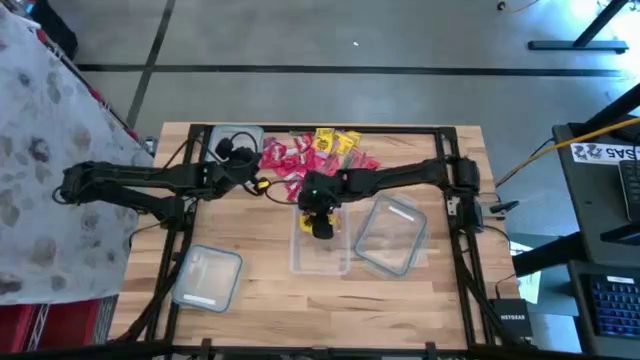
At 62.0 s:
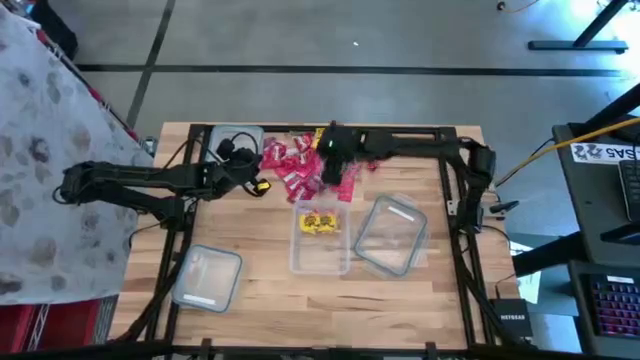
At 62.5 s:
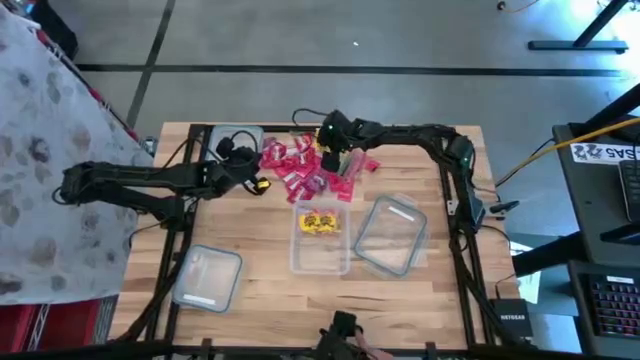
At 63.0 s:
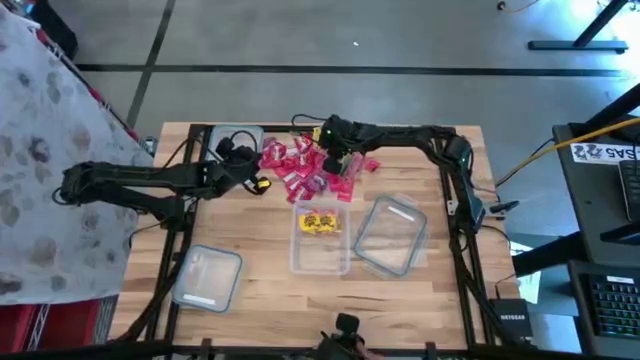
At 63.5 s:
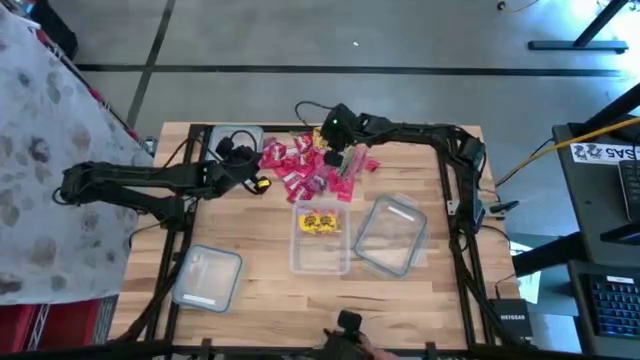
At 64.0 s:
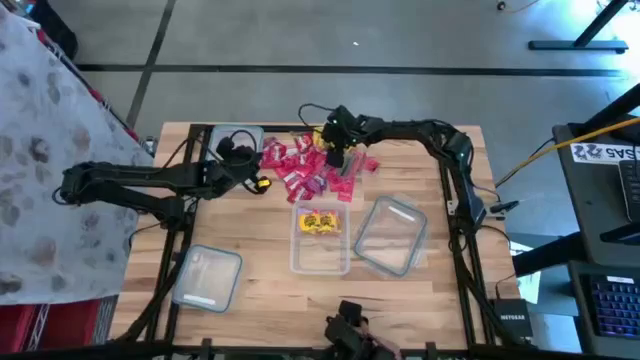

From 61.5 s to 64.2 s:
Task: Sort candy
Put the yellow candy into the right transparent bin

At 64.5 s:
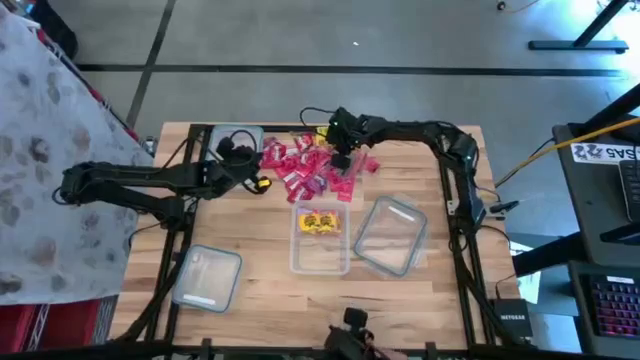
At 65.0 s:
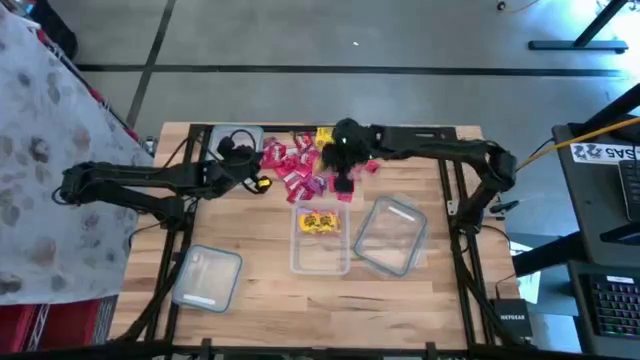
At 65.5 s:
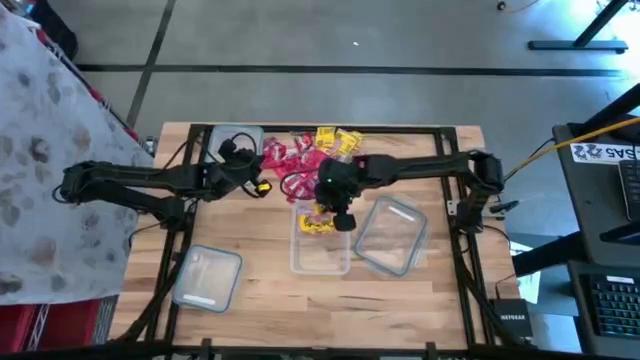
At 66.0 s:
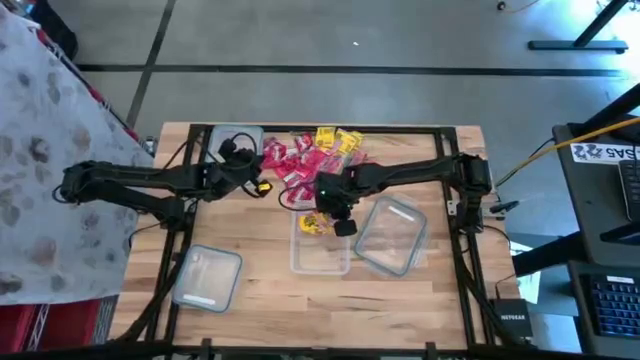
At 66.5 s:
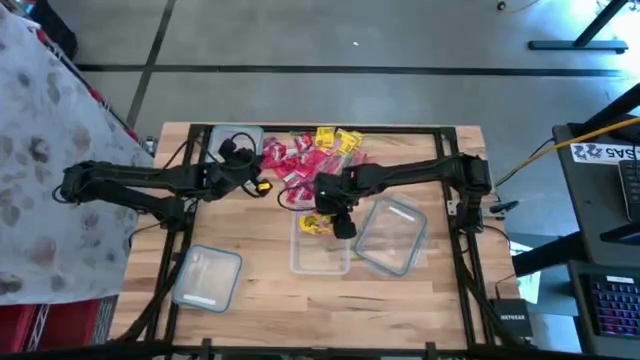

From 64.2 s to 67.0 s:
Put the yellow candy into the right transparent bin

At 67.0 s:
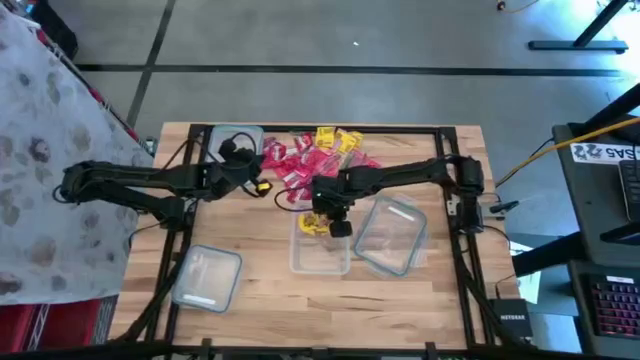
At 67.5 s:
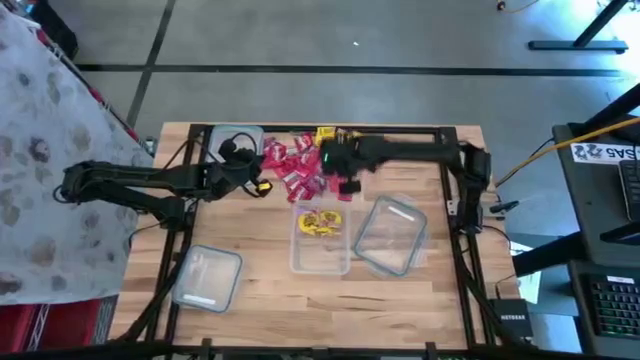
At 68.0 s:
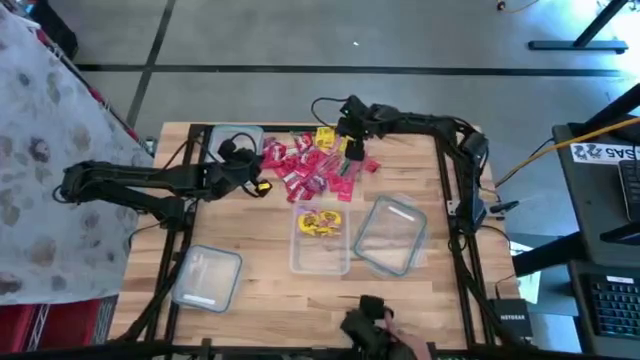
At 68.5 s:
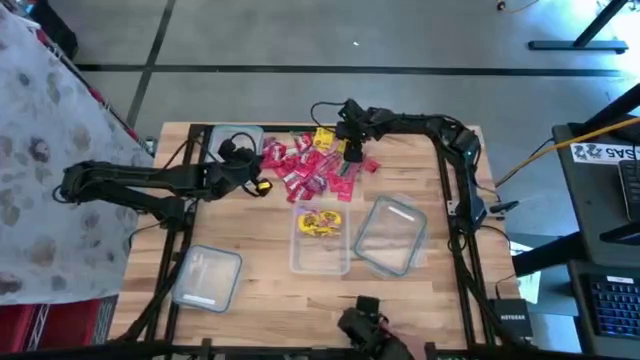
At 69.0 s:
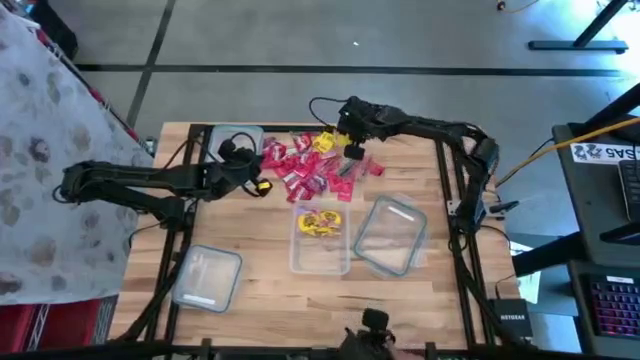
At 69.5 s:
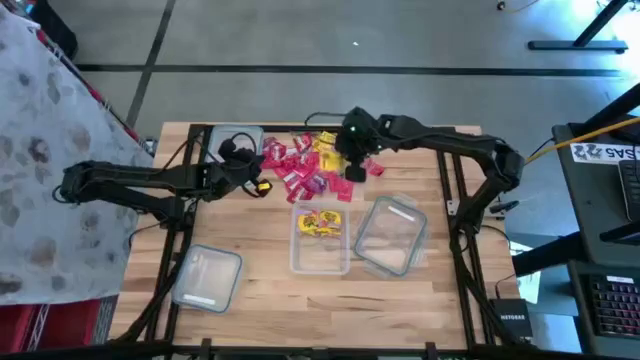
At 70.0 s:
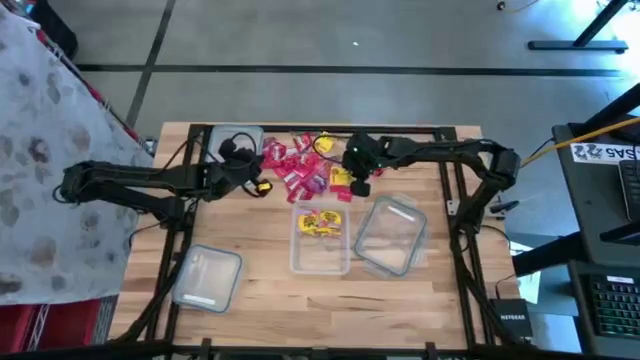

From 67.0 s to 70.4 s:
Put the yellow candy into the right transparent bin

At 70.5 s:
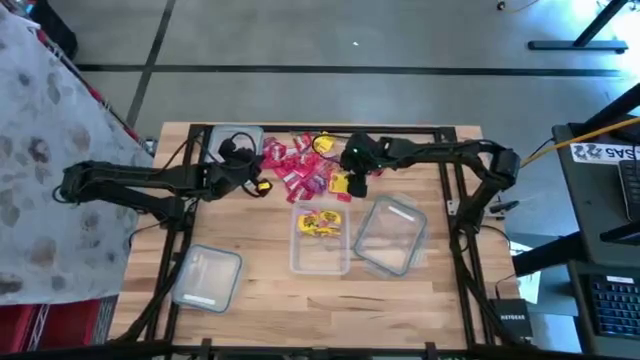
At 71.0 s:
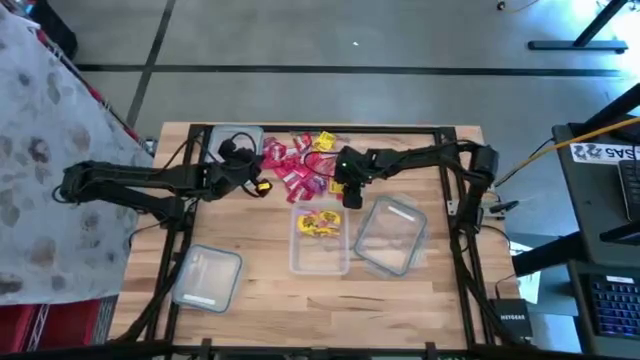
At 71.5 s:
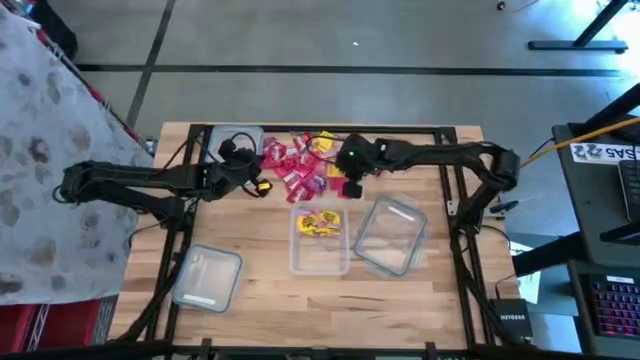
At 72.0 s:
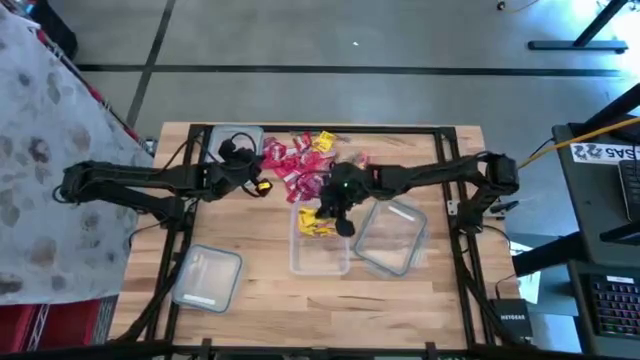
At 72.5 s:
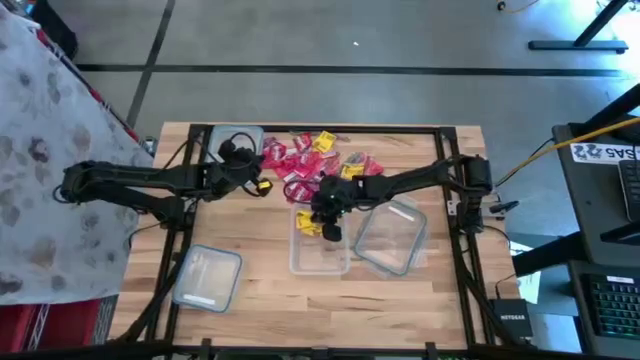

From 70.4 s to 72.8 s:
Put the yellow candy into the right transparent bin

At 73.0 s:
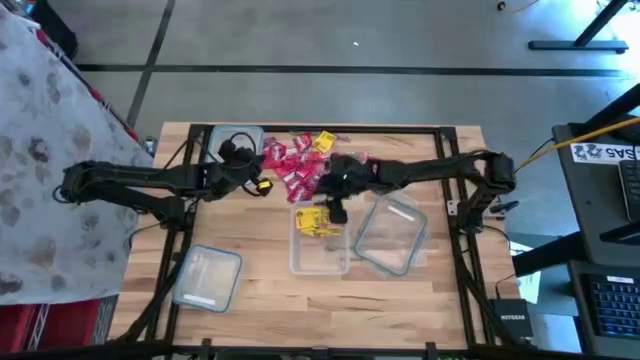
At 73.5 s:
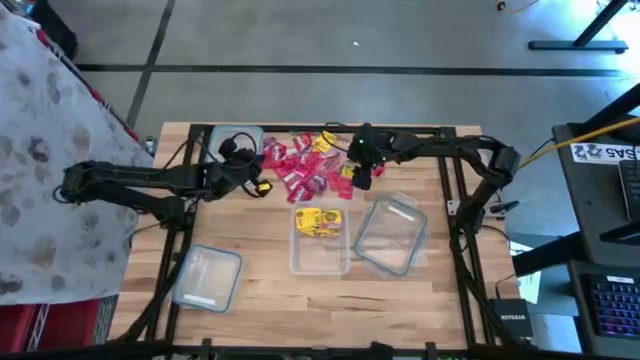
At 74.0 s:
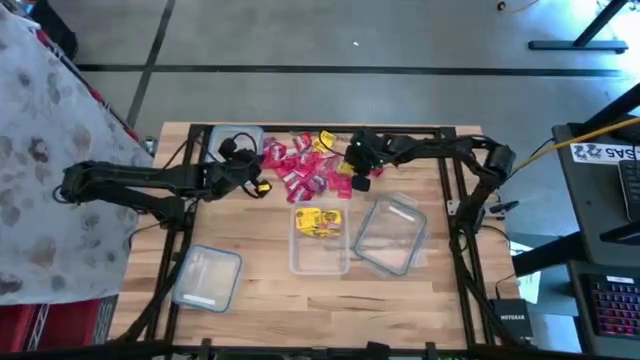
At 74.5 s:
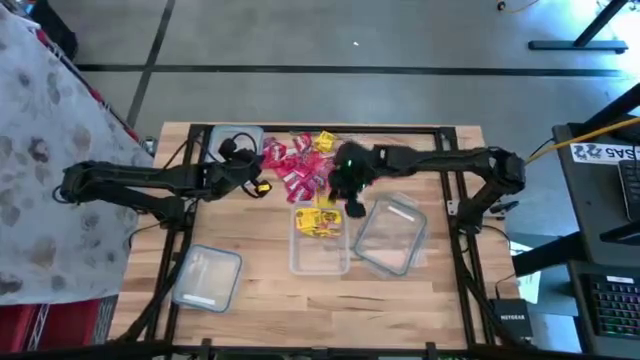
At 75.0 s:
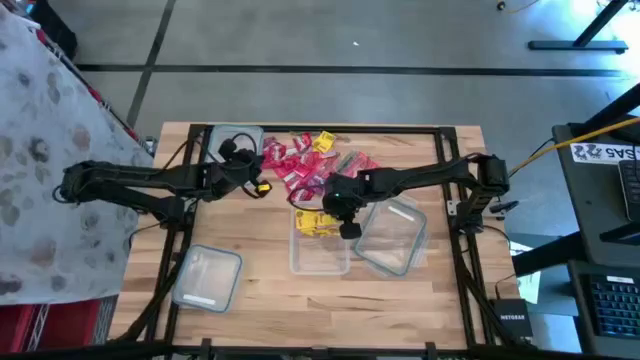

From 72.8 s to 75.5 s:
Put the yellow candy into the right transparent bin

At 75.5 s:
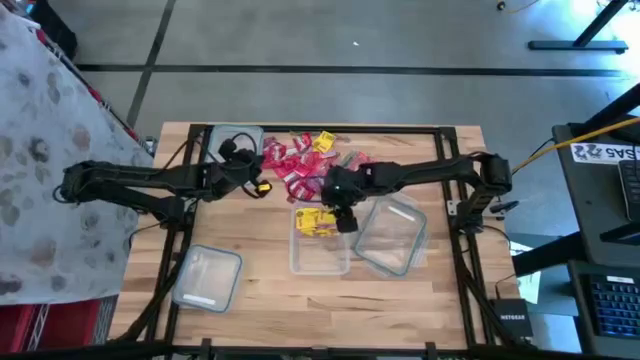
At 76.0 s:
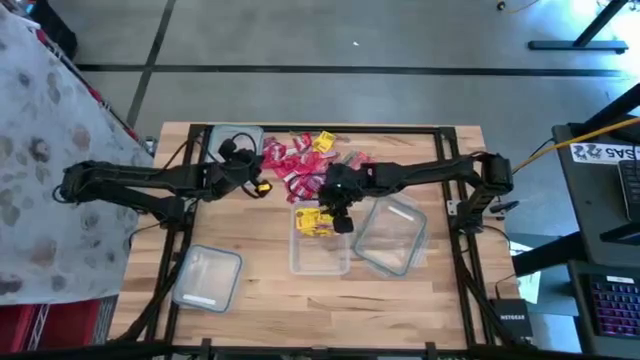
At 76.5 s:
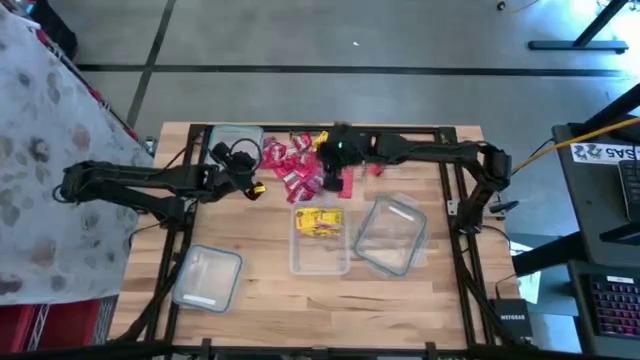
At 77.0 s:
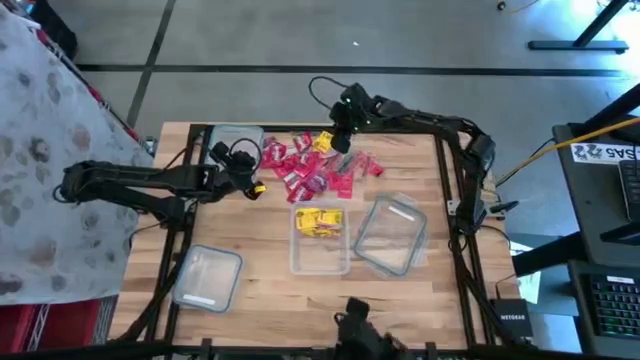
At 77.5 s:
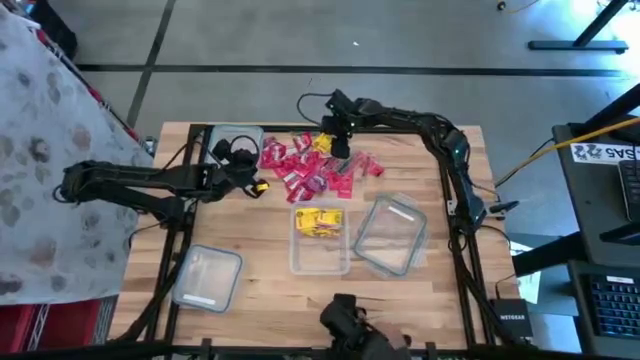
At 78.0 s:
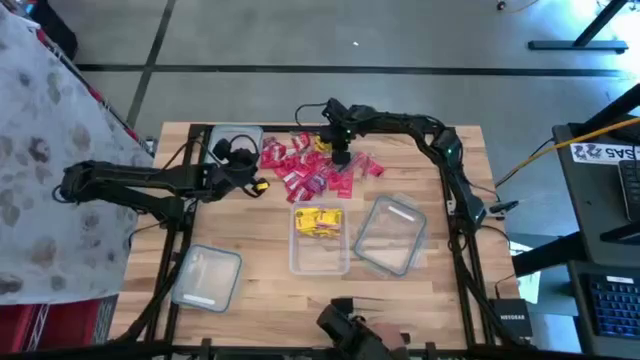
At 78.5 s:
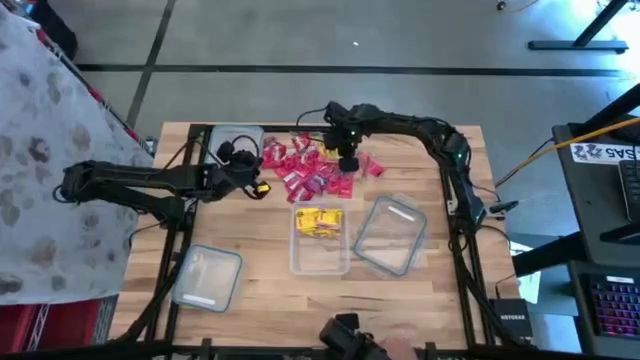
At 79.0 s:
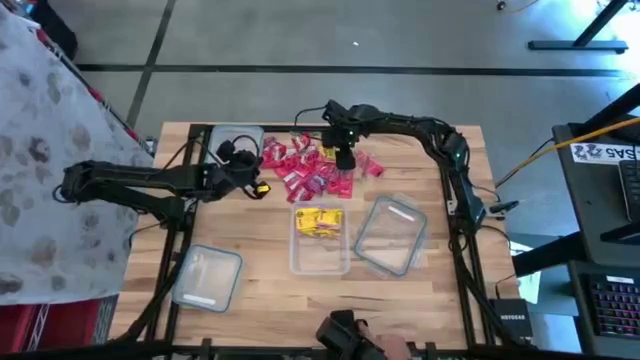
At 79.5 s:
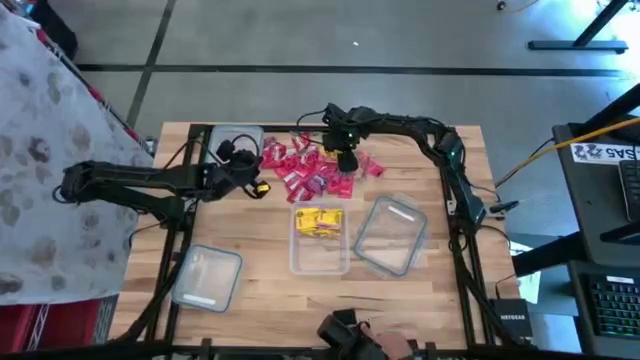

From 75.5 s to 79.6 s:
Put the yellow candy into the right transparent bin

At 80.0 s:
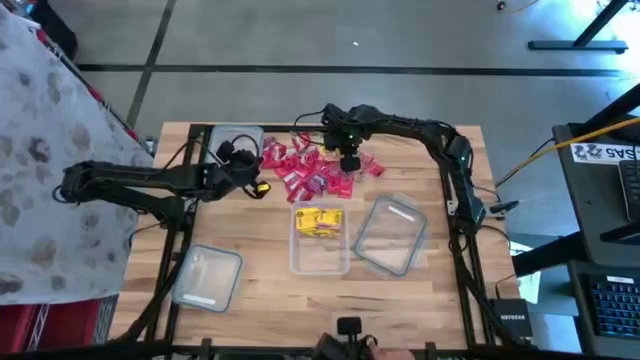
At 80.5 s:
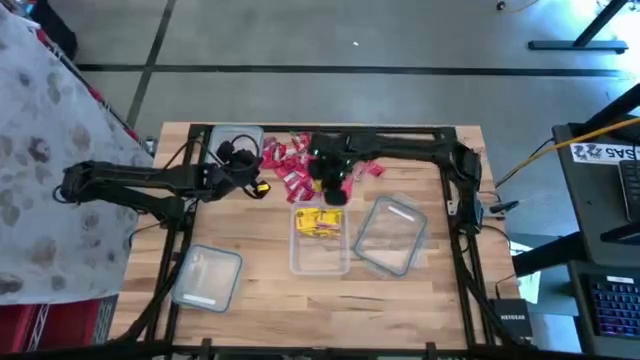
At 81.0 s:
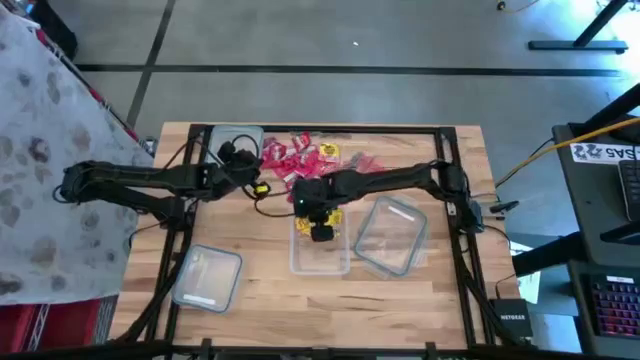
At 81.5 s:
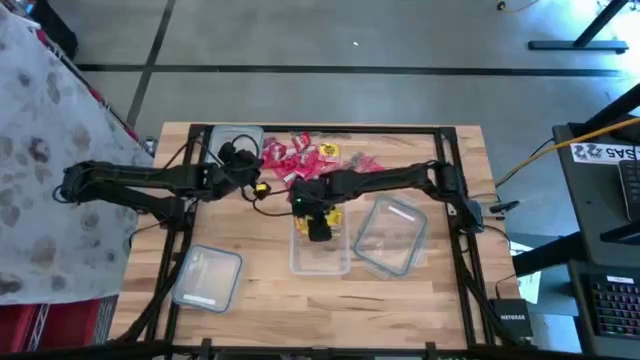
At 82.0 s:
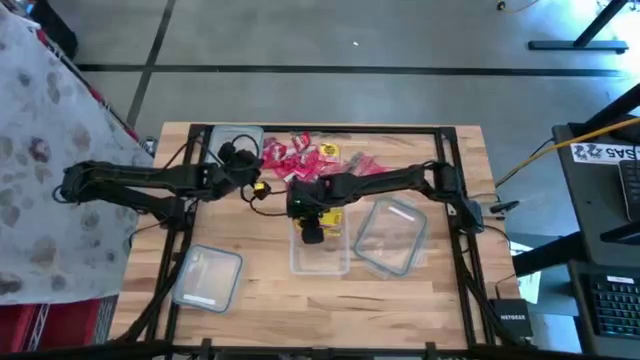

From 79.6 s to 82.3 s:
Put the yellow candy into the right transparent bin
